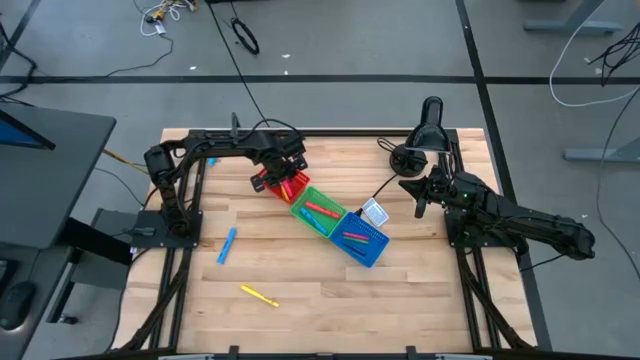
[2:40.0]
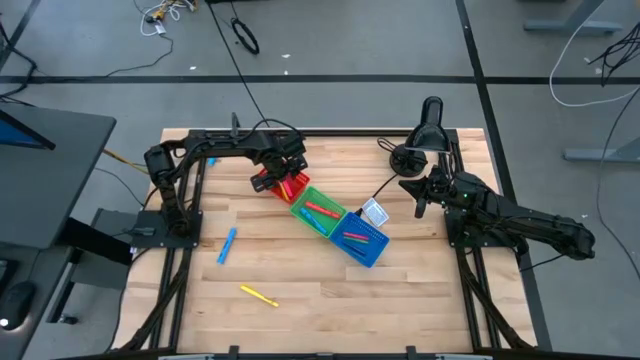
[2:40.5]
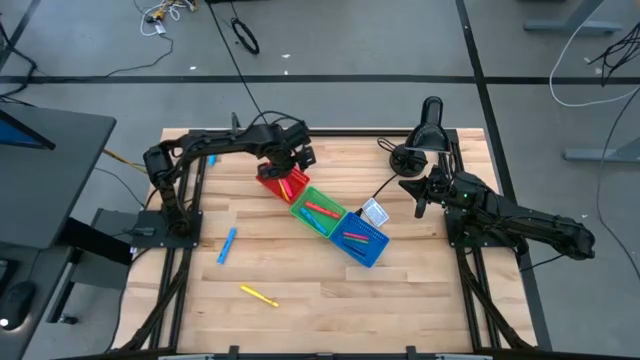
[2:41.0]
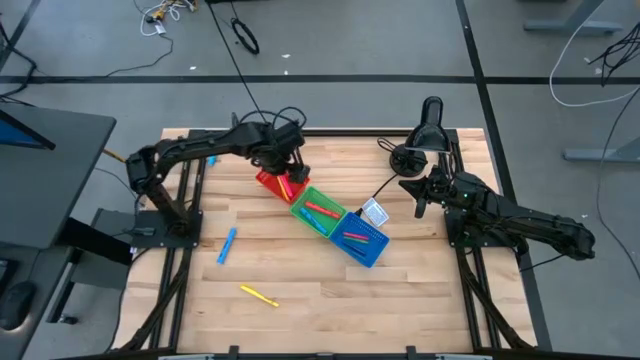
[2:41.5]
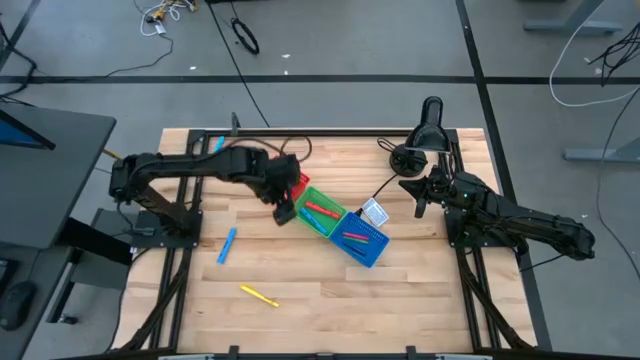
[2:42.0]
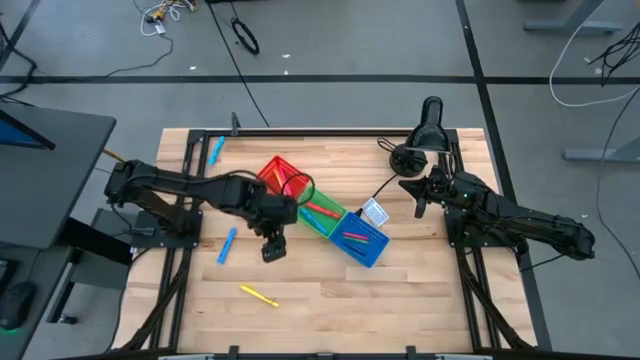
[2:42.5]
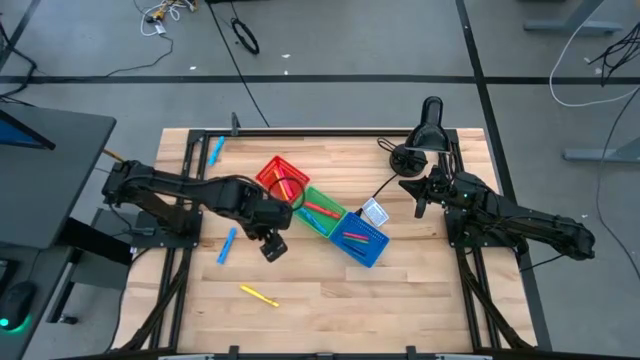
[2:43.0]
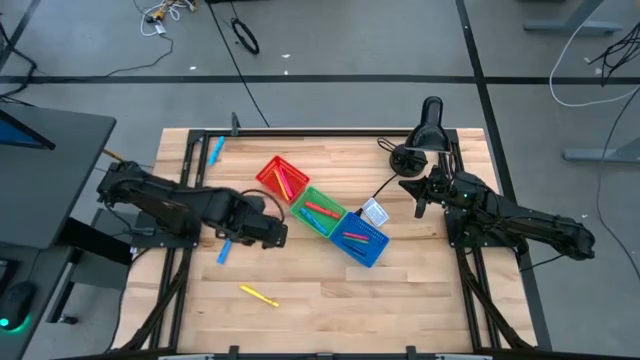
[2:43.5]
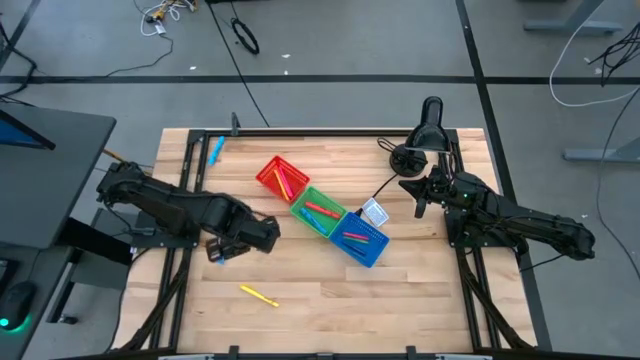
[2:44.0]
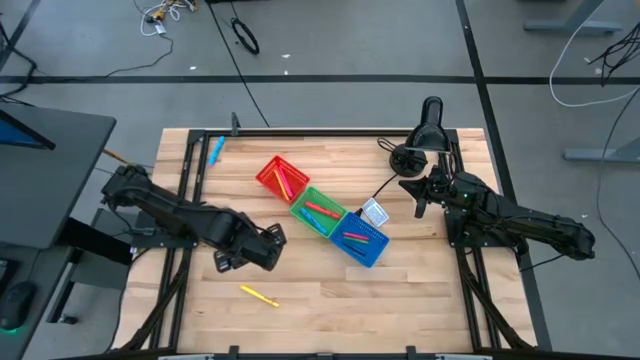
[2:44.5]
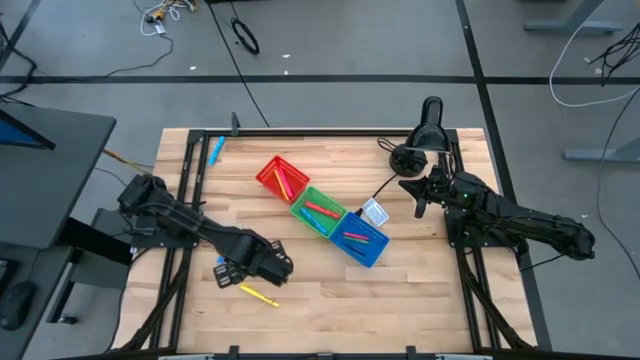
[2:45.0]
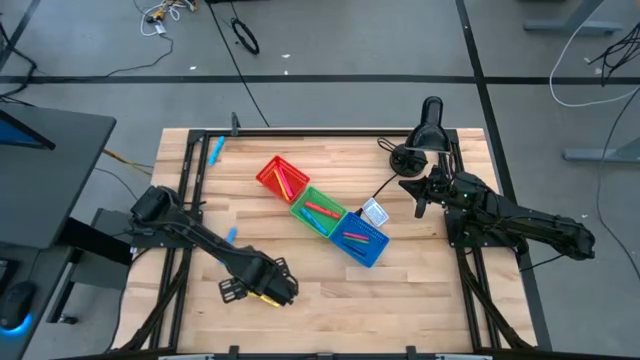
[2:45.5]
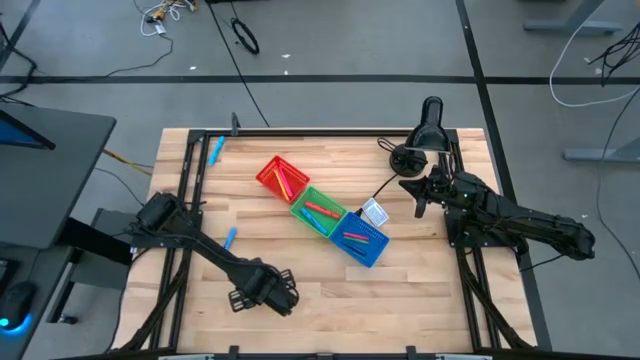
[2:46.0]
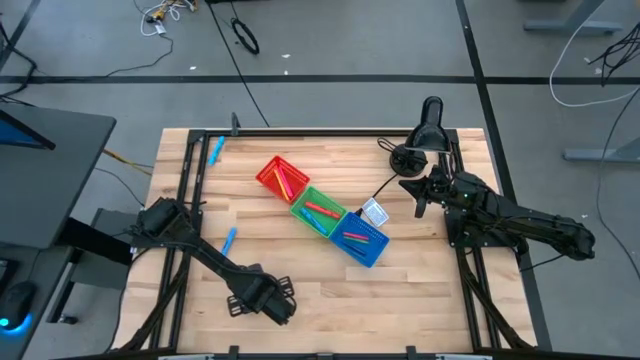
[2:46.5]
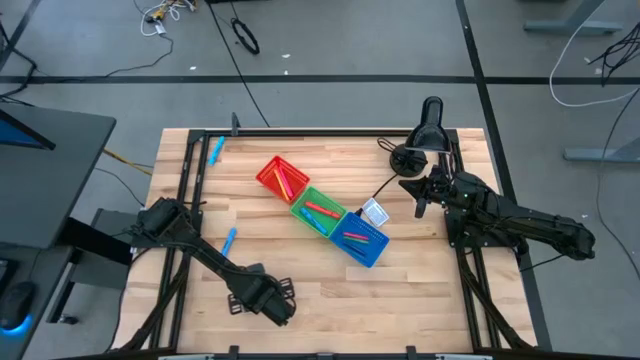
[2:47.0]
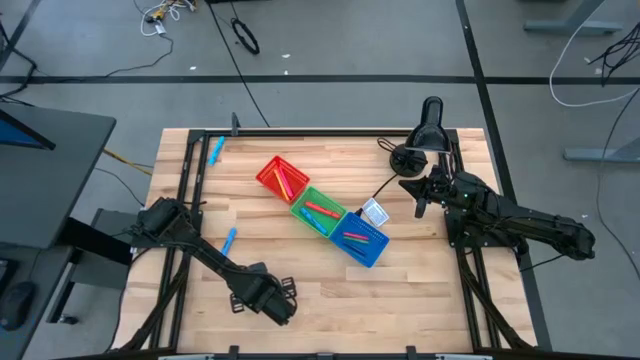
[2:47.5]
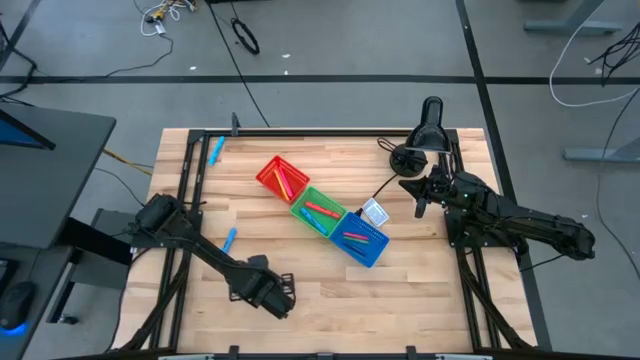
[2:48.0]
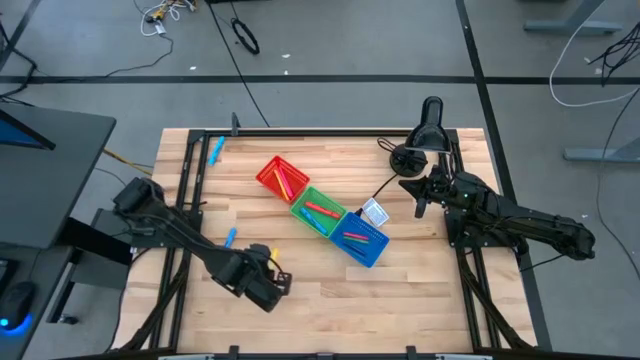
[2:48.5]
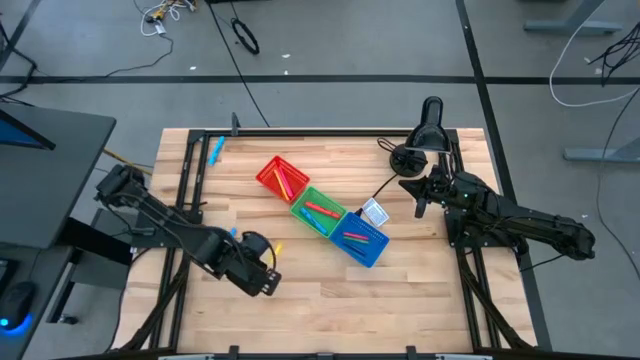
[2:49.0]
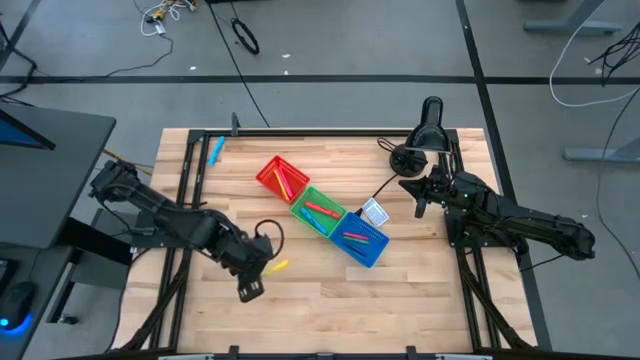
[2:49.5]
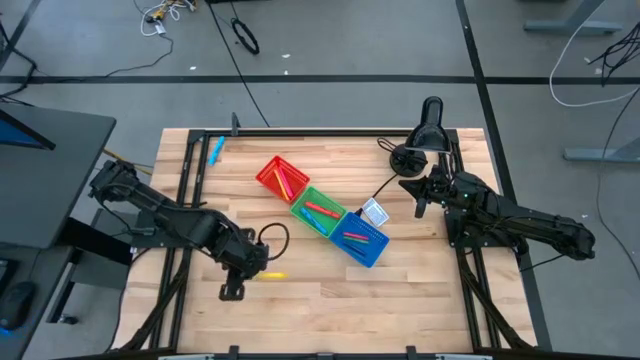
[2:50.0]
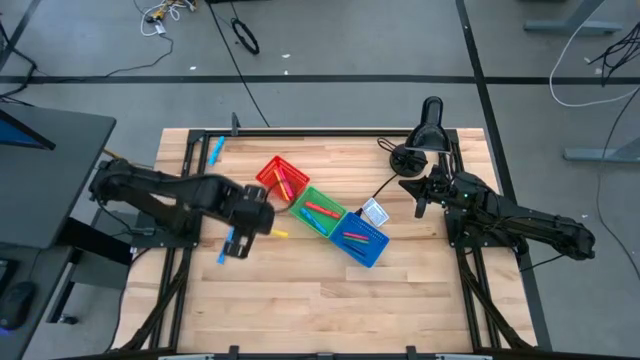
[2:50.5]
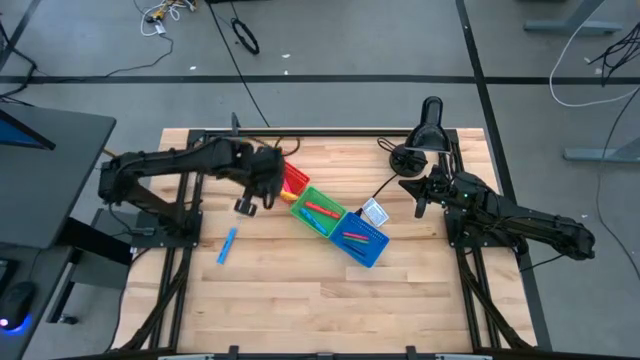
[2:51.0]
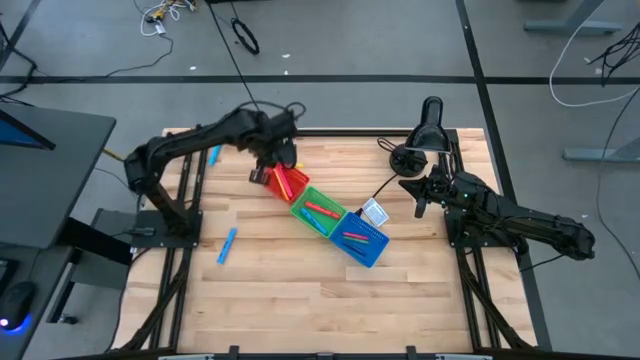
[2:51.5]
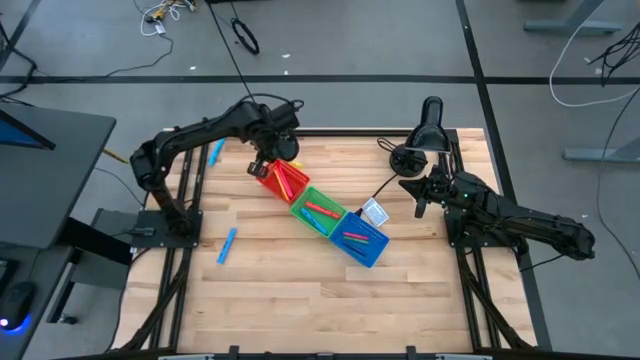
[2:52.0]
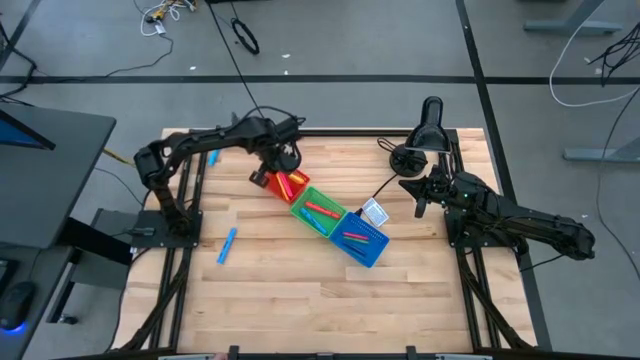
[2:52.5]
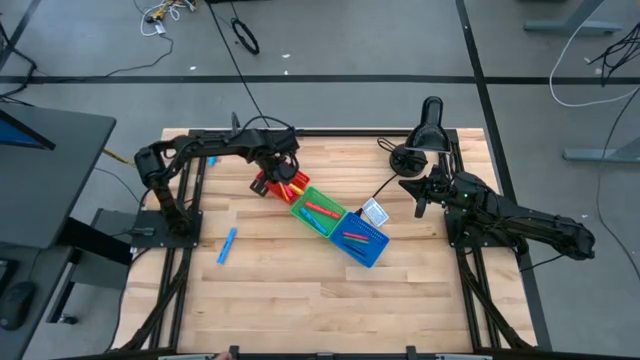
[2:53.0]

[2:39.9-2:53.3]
Task: Pick & Place Markers
Put the yellow marker pen into the red bin

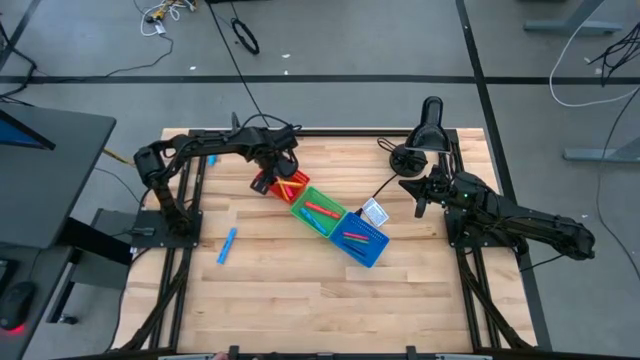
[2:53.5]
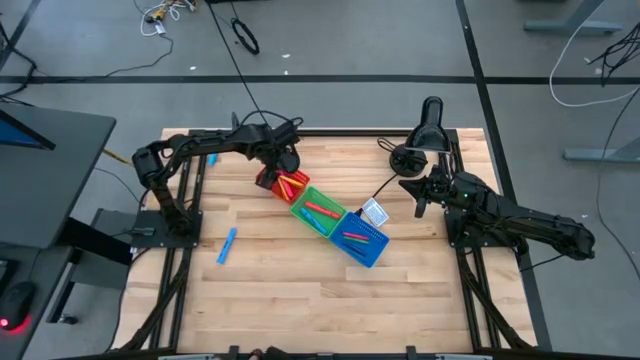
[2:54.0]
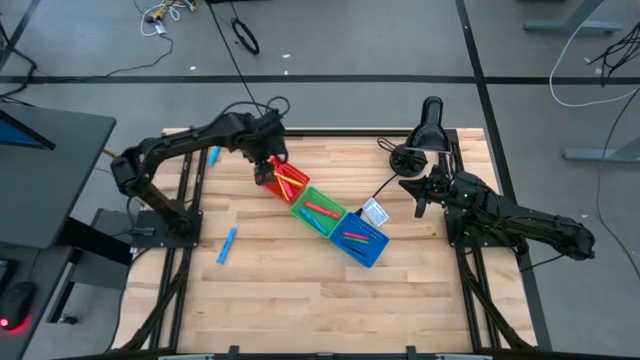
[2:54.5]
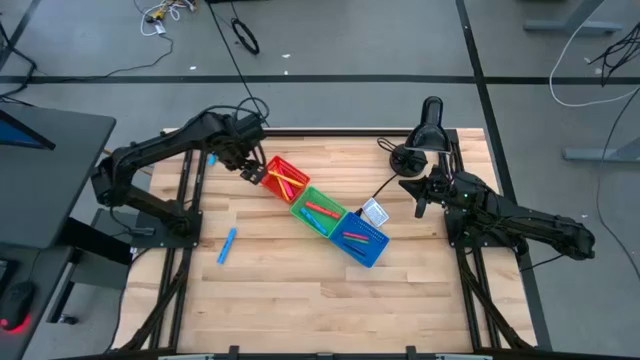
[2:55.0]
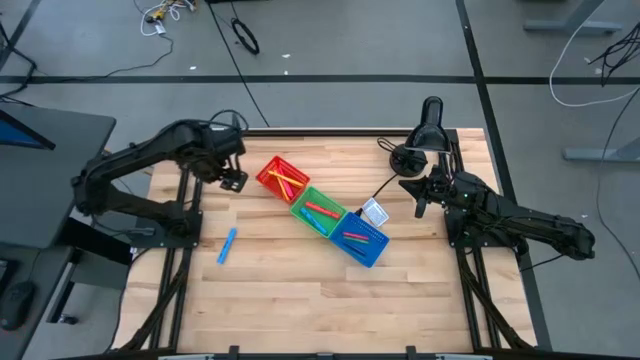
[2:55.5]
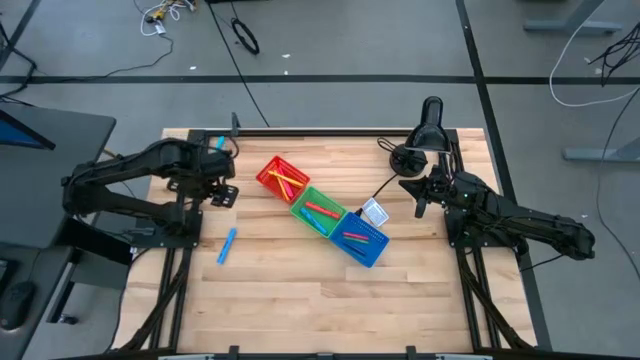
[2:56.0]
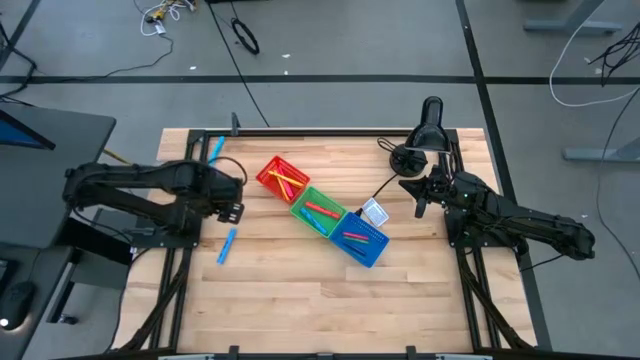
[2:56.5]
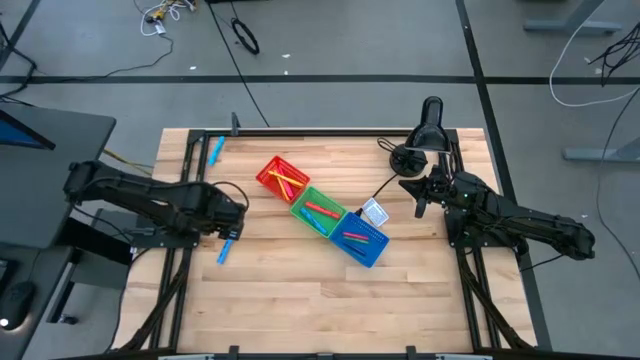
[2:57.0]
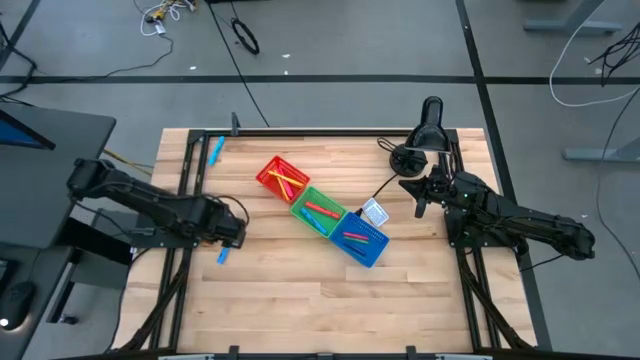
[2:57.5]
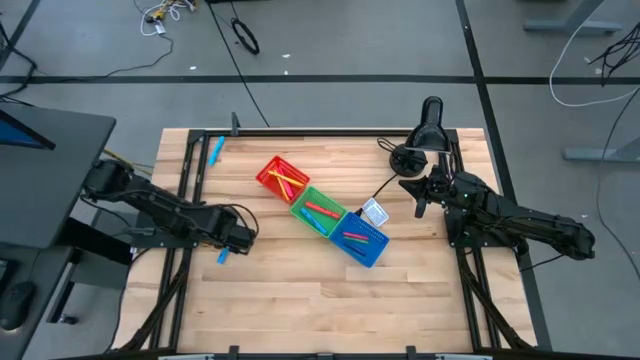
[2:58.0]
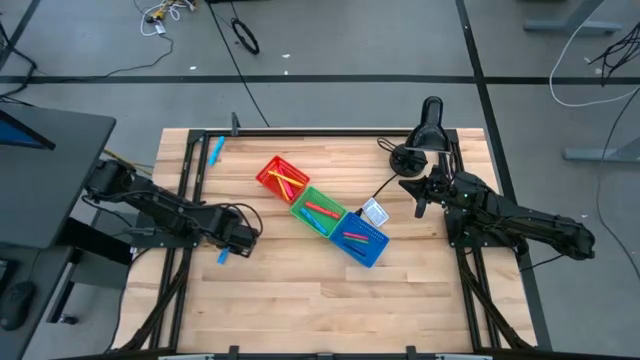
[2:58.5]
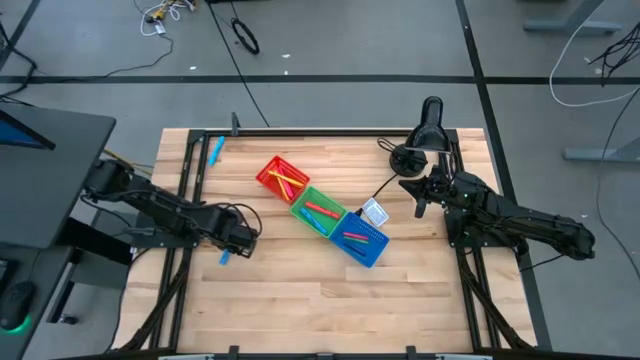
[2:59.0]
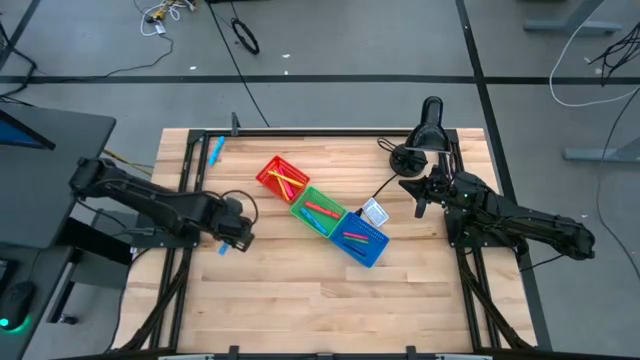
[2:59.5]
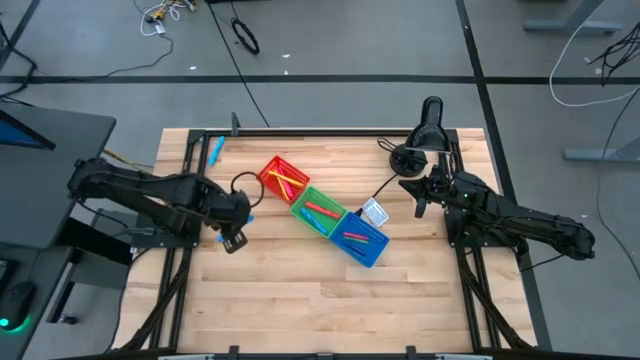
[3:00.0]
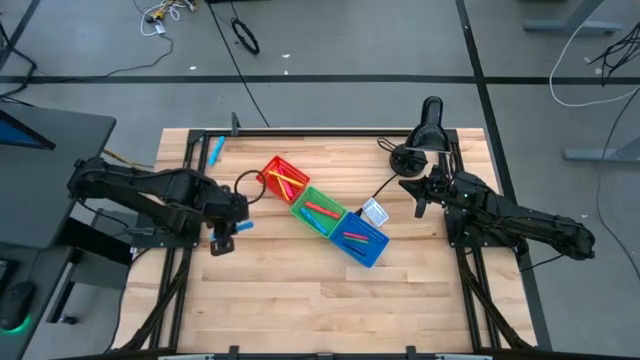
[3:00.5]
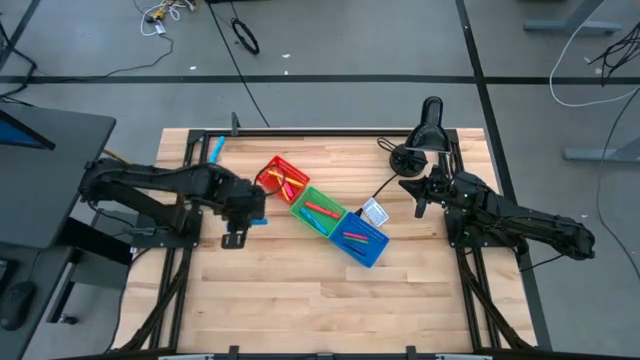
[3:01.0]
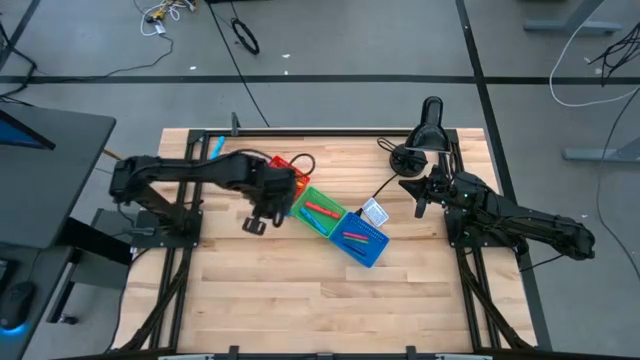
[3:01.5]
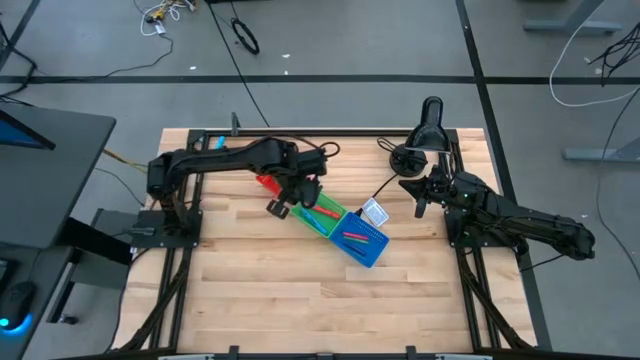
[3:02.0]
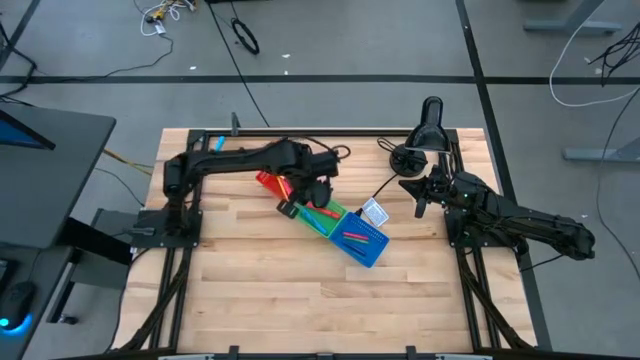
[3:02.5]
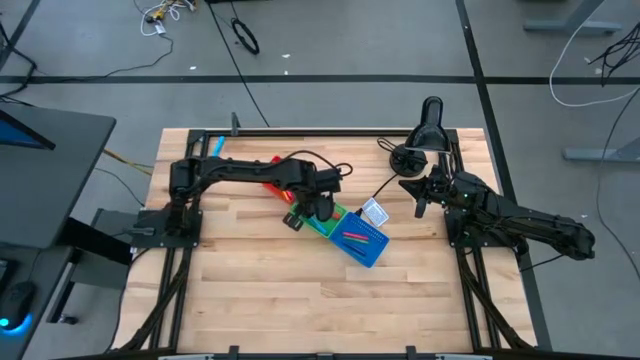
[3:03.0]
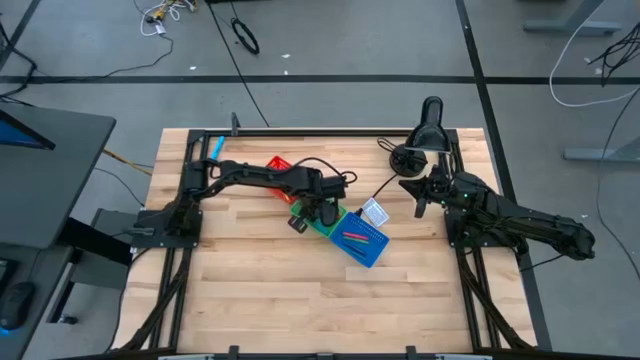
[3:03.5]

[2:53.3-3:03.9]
Put the bottom blue highlighter pen into the green bin
